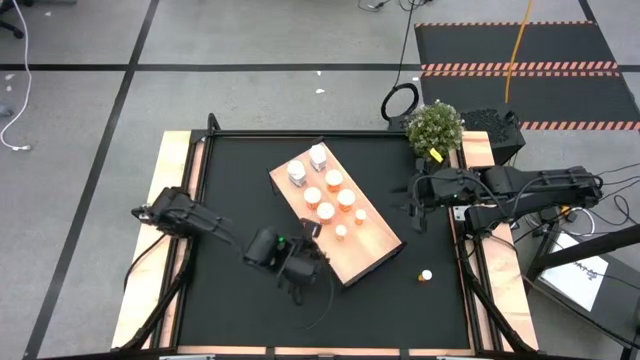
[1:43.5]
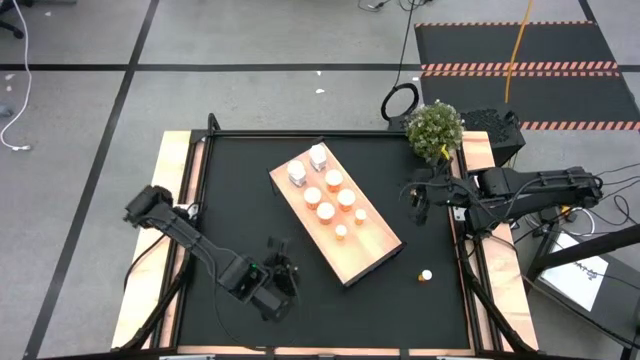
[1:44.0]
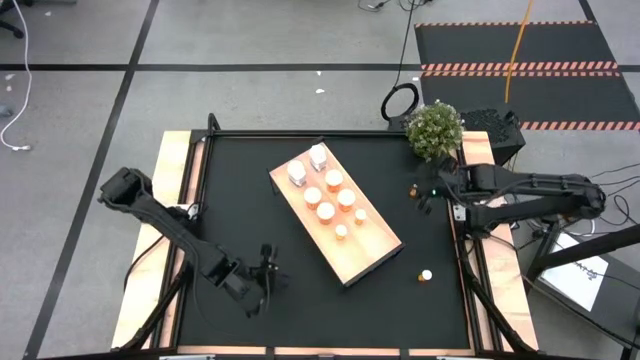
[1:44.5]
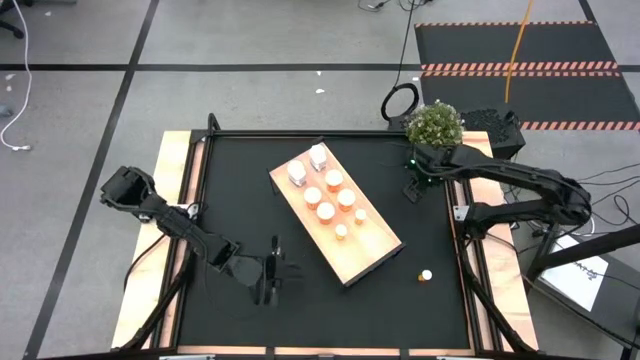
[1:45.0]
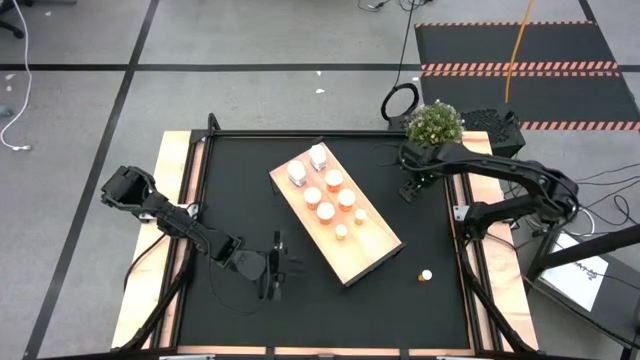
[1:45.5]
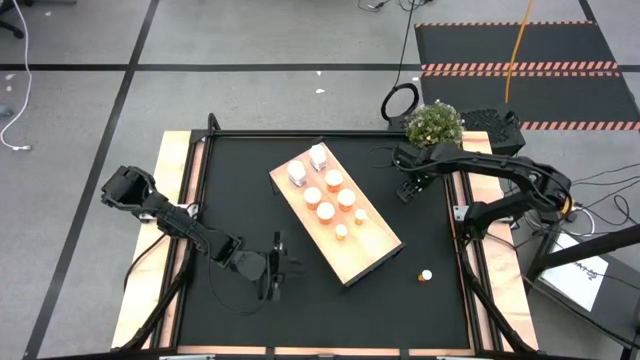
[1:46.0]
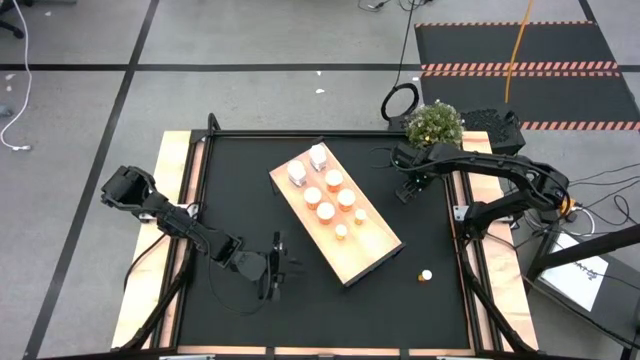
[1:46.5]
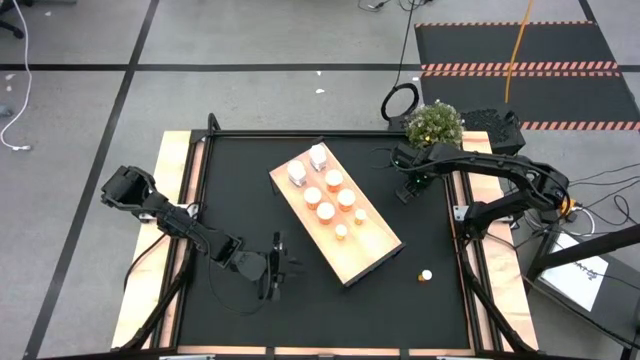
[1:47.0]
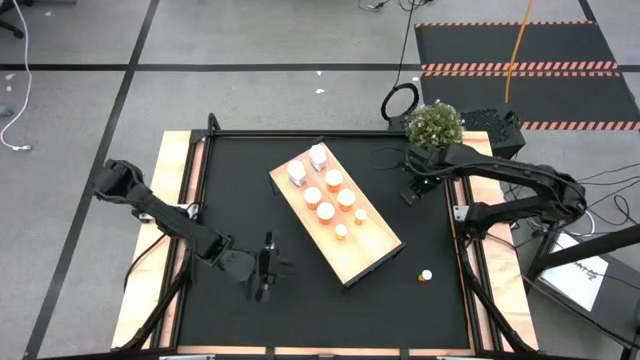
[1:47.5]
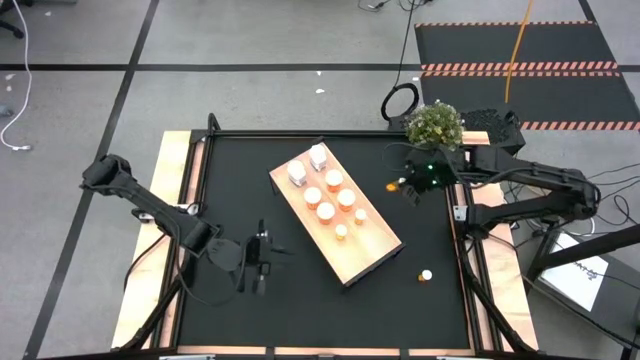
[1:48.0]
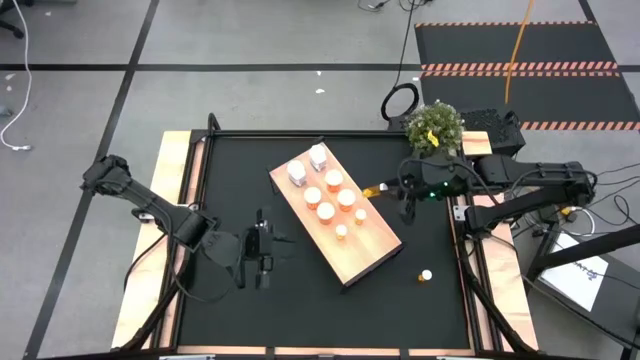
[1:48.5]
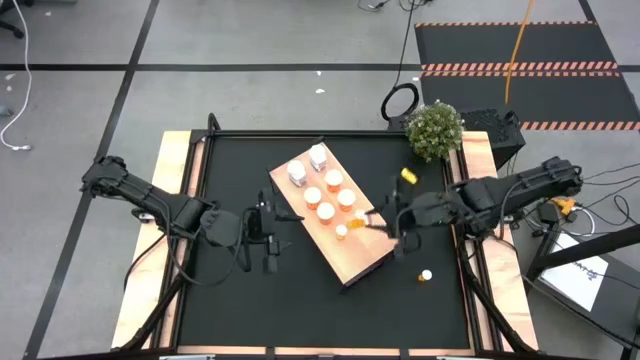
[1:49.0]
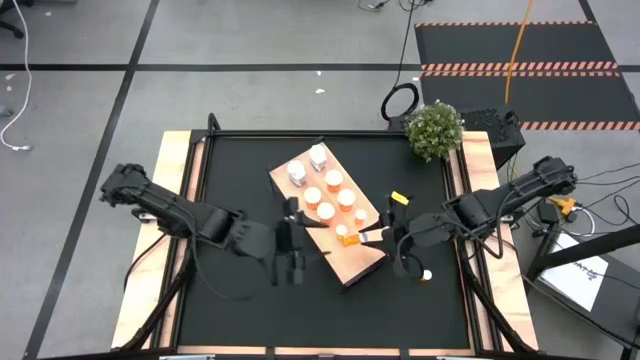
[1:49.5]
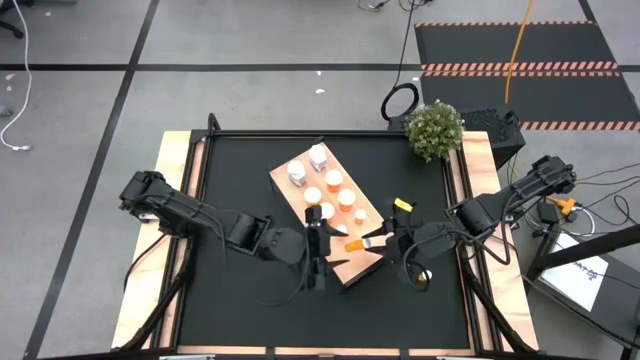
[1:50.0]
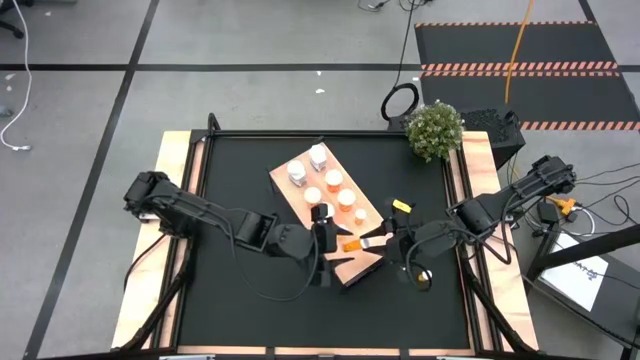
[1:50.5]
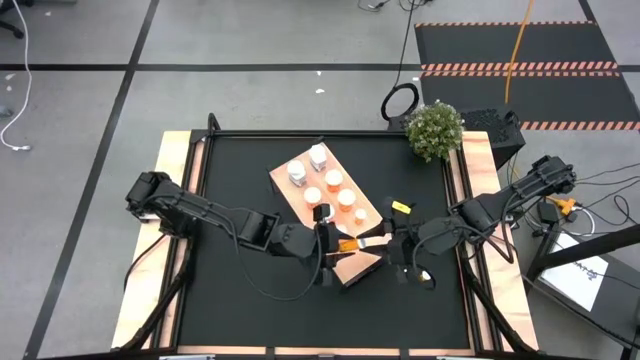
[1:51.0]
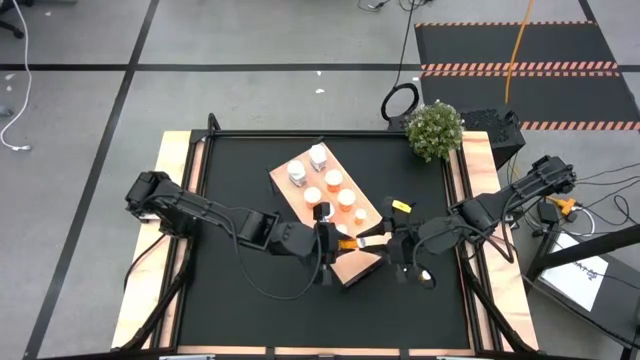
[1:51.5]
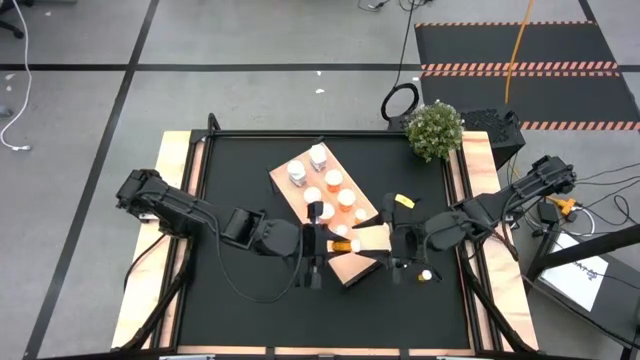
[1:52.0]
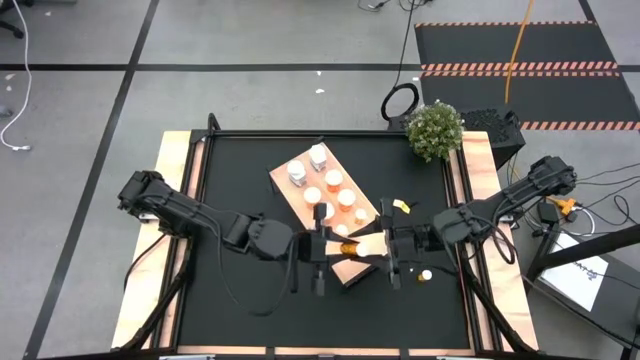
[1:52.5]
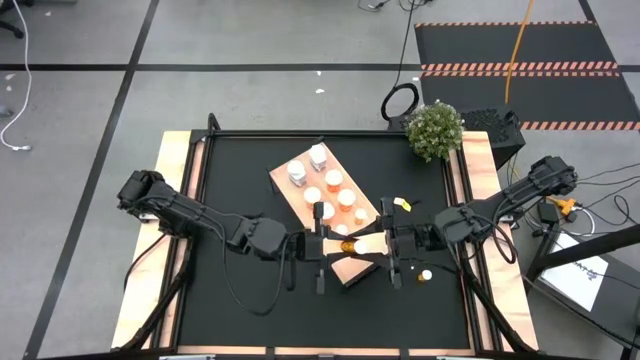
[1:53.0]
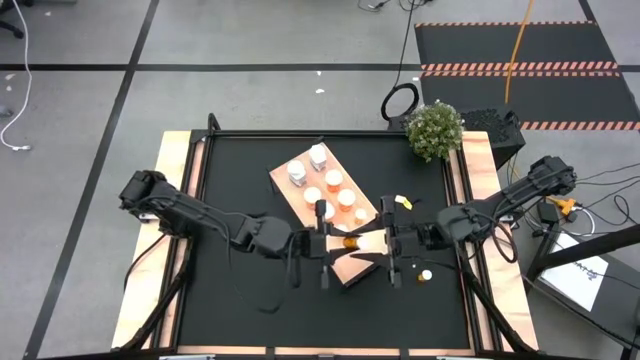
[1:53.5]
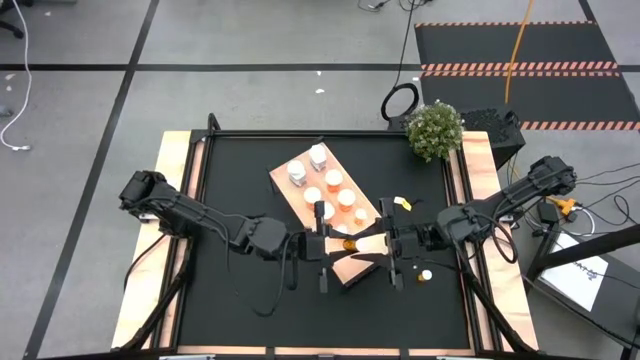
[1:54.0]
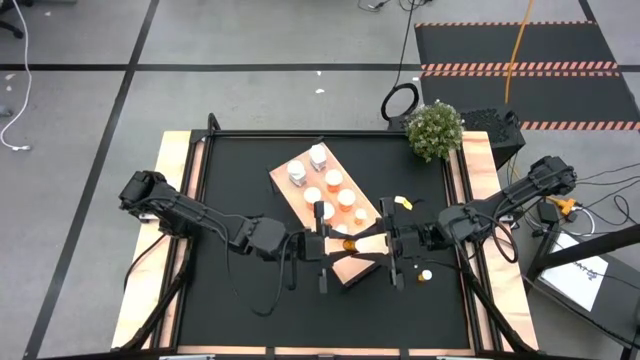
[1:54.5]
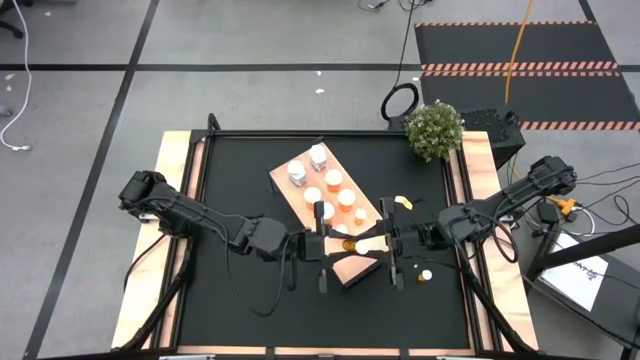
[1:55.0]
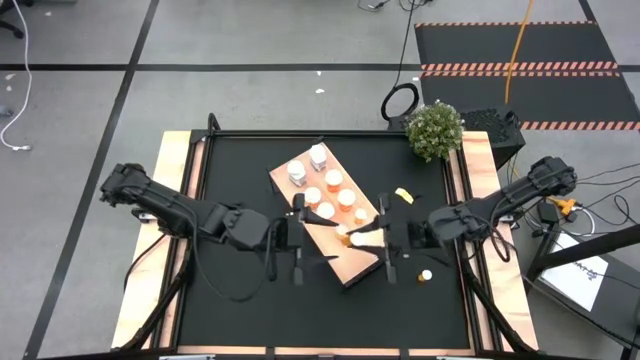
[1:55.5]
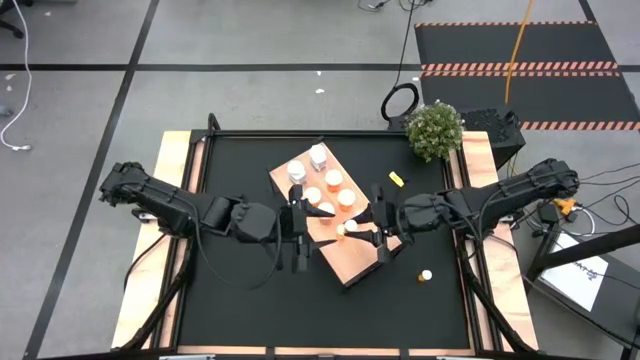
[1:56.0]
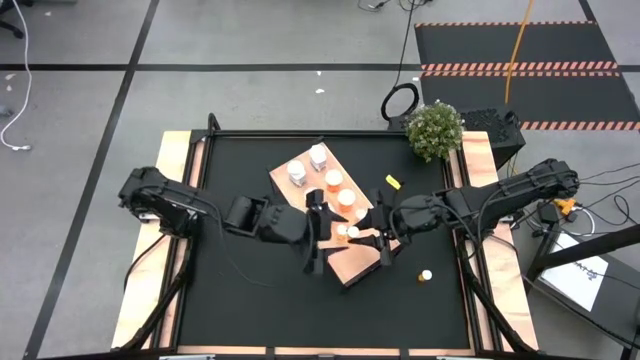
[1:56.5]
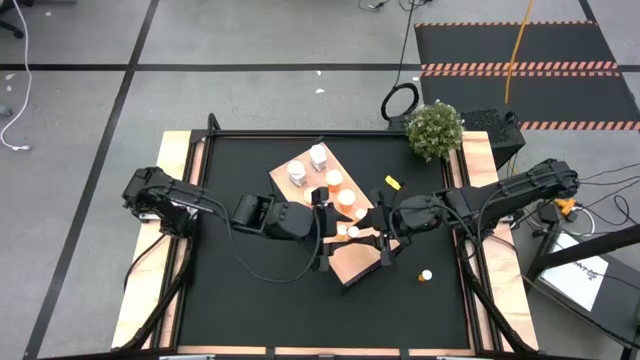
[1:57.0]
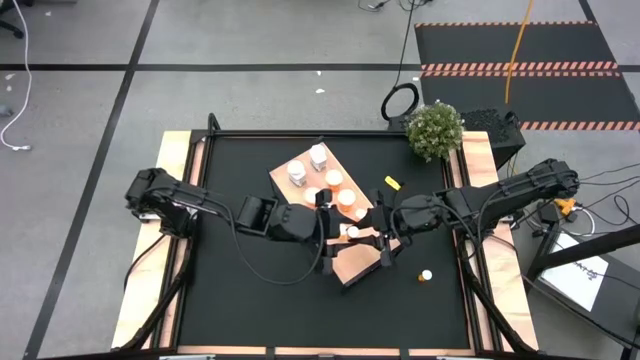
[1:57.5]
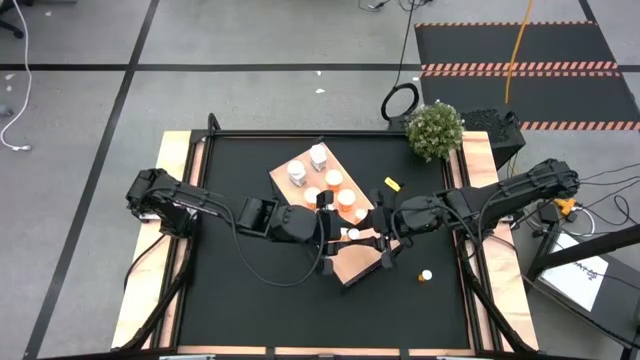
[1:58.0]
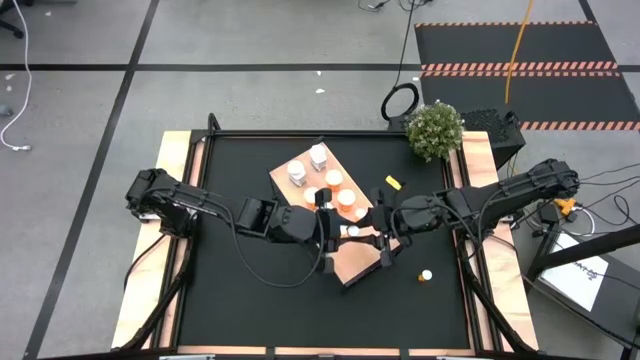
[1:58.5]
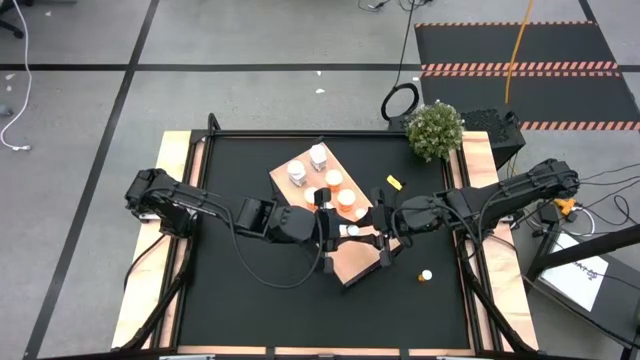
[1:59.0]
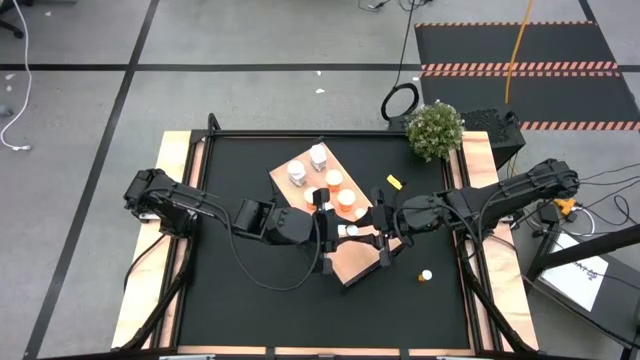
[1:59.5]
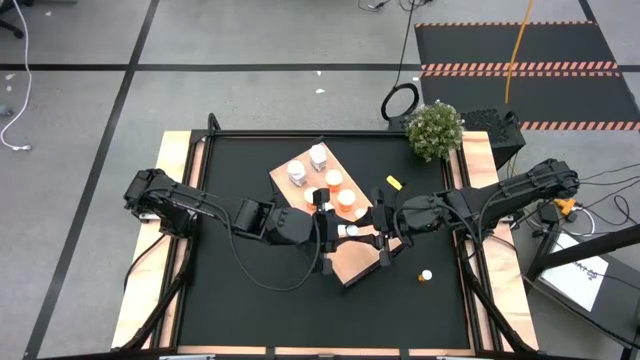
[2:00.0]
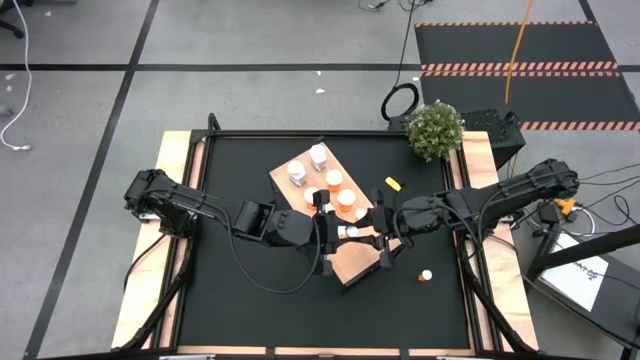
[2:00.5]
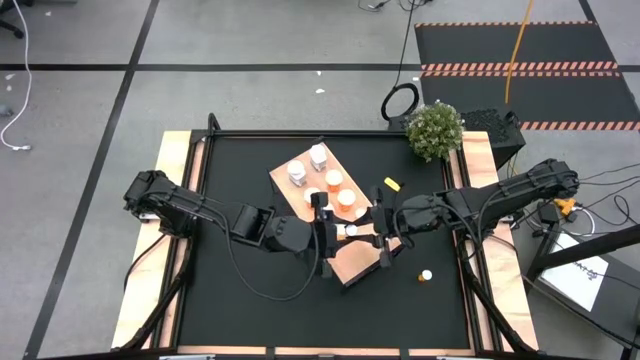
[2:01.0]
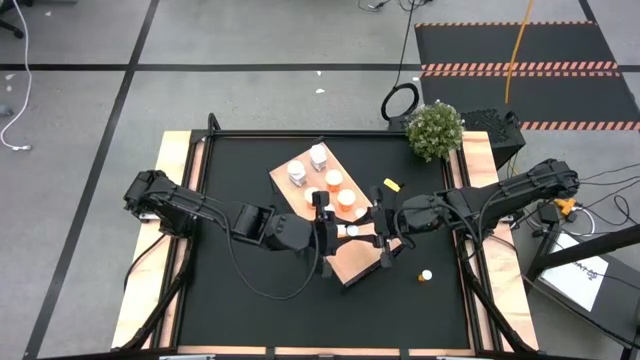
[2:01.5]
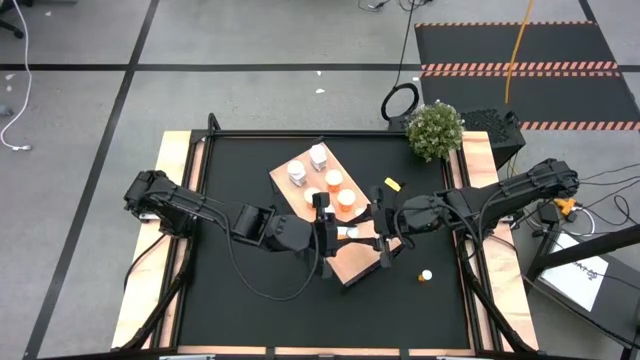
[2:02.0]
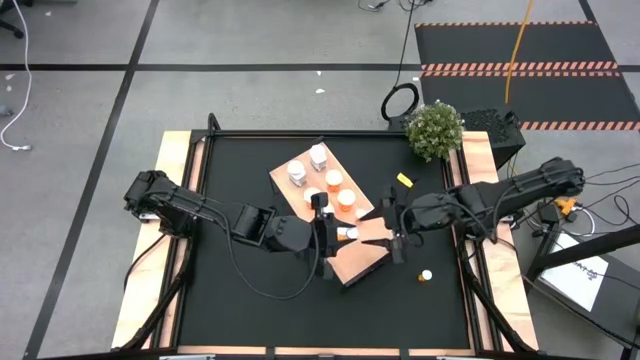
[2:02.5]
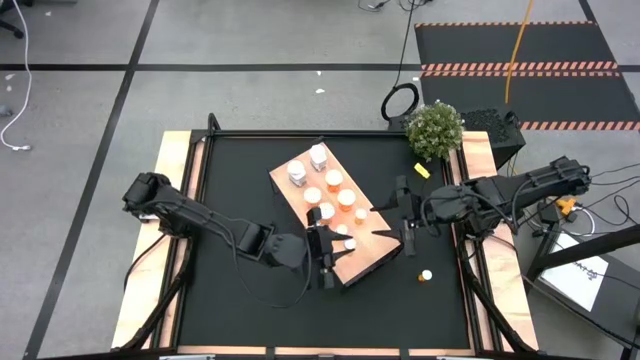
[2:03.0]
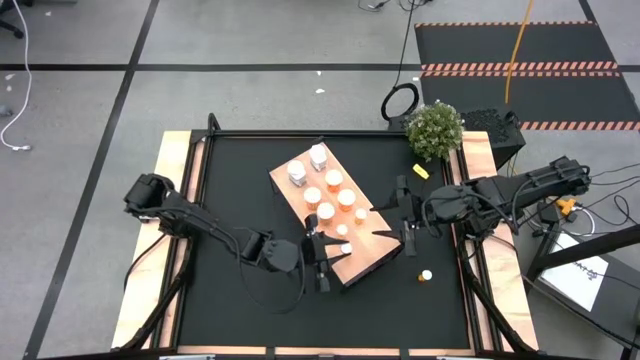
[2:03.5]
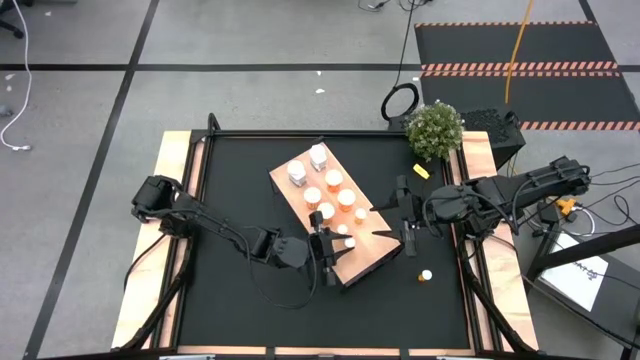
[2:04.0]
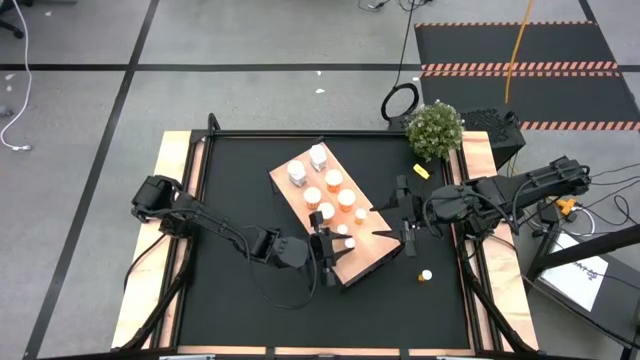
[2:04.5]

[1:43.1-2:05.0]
Task: Pick and place medicine bottles onto shelf by color
Put the top orange tablet bottle on the shelf aligned with the orange tablet bottles

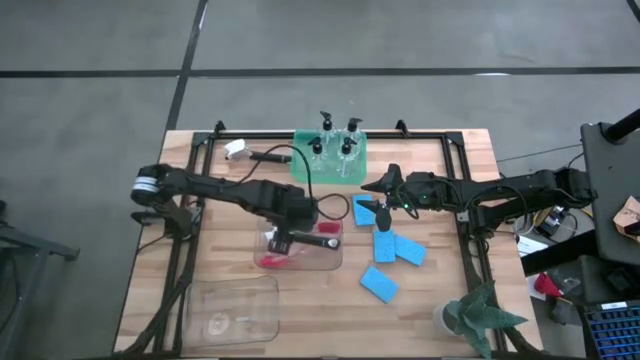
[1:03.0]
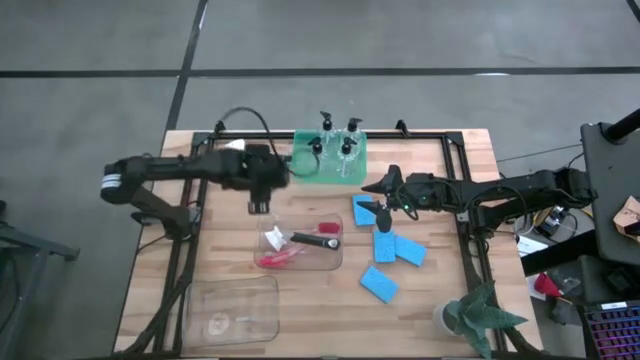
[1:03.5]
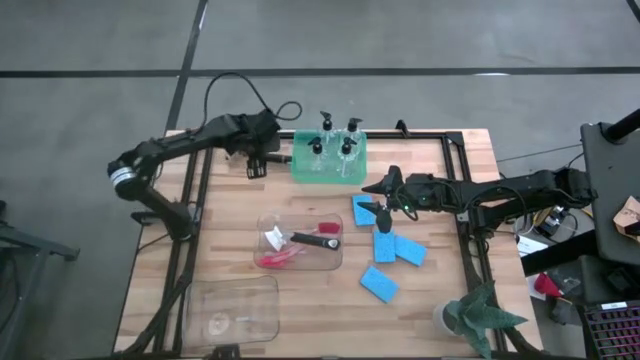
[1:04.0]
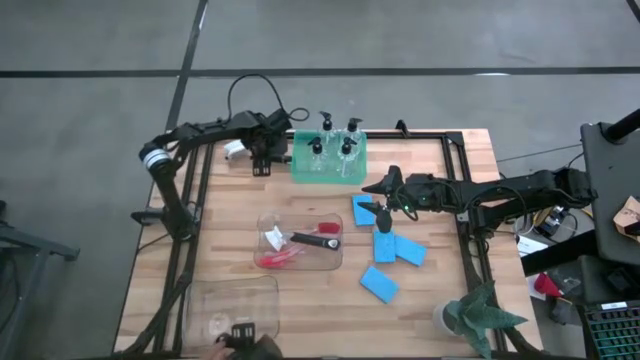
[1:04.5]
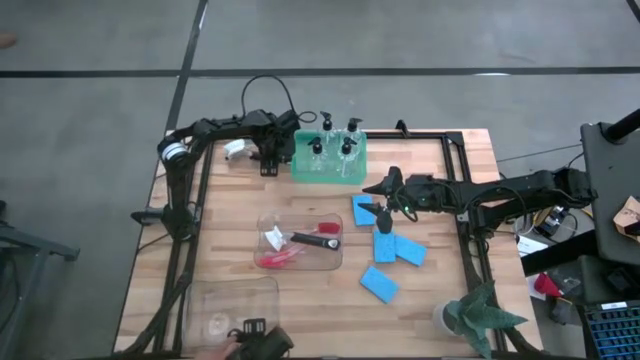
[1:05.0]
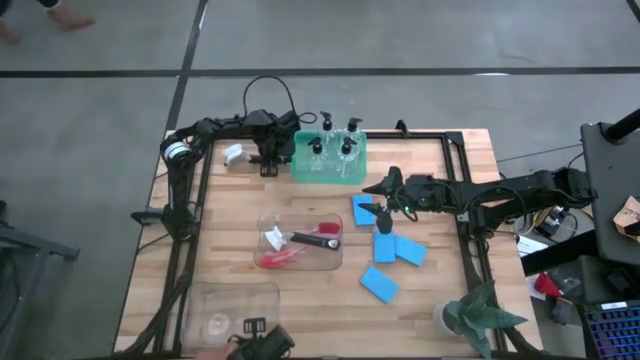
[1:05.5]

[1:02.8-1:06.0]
Task: Pick & Place Kitchen Sink Supplies
Put the black dish brush into the top transparent bin
